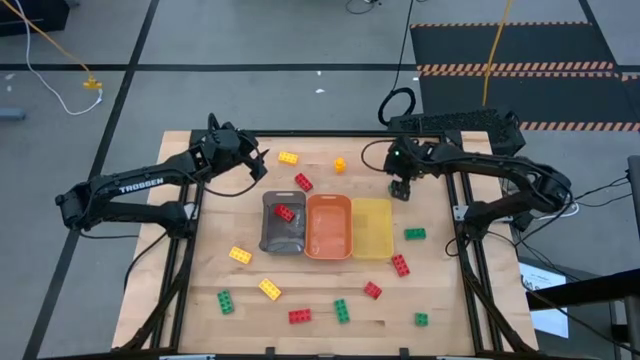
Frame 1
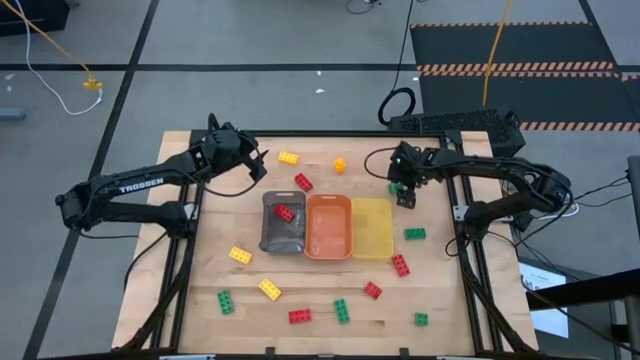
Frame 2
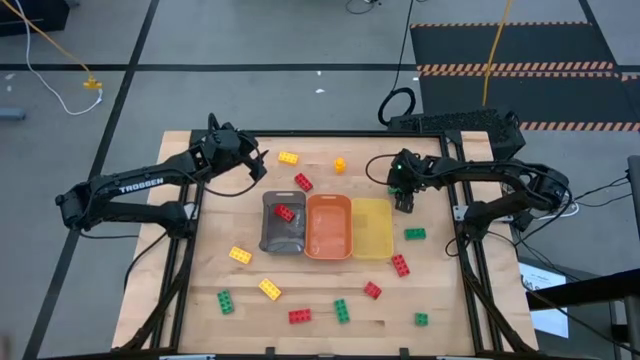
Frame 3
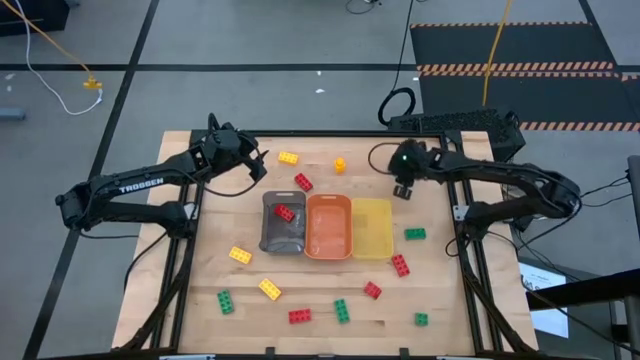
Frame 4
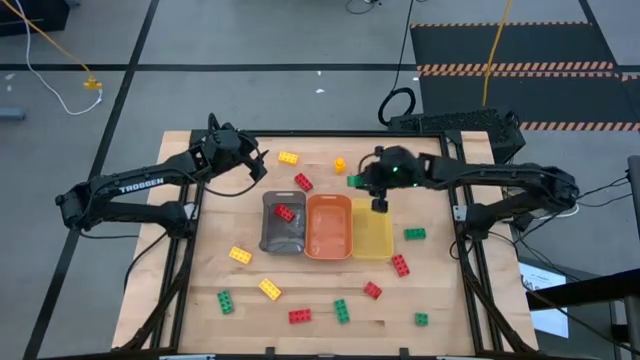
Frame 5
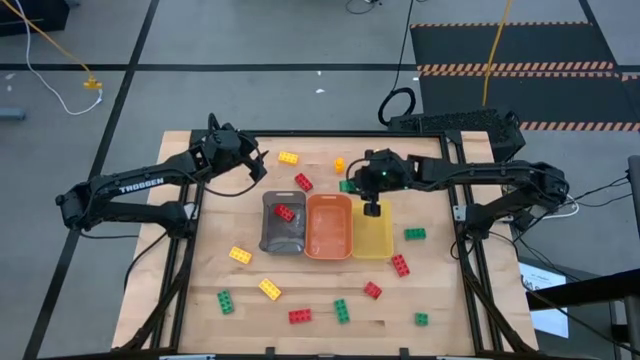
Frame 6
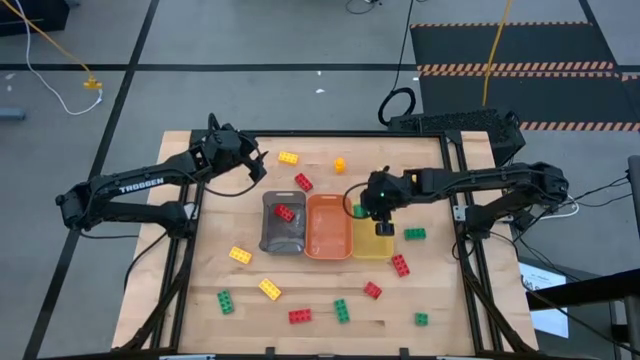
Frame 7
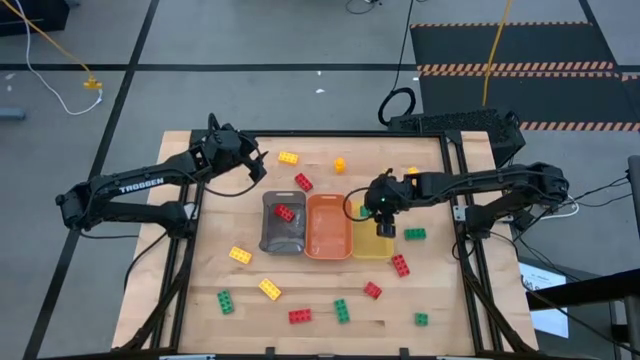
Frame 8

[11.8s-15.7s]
Task: Sort & place blocks by color
Put the green game piece into the yellow bin

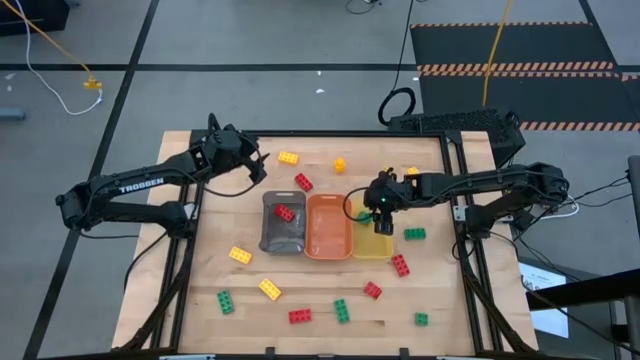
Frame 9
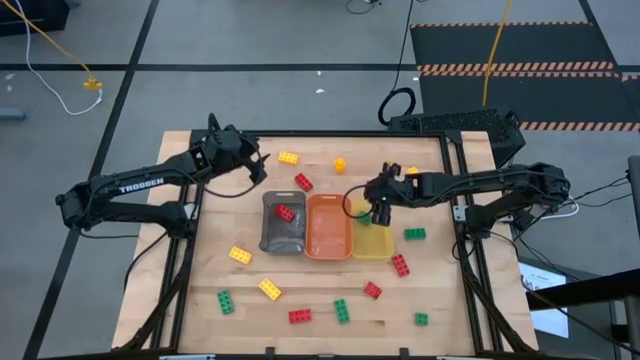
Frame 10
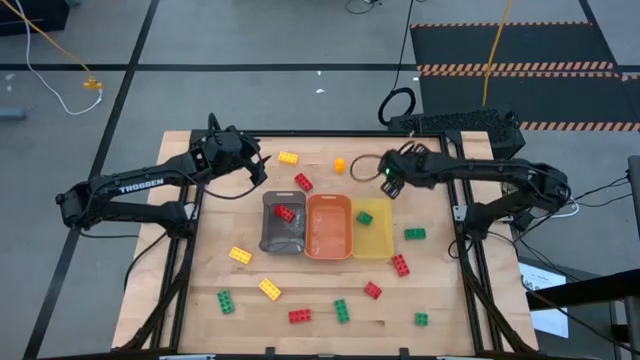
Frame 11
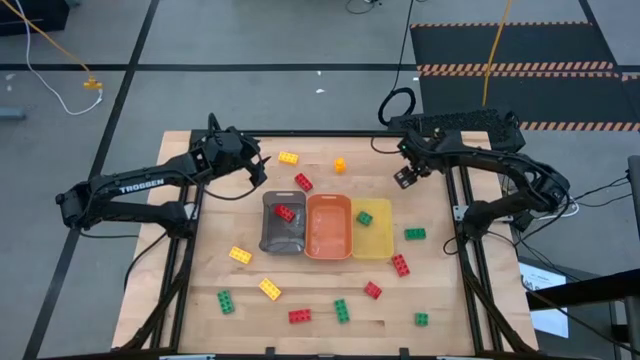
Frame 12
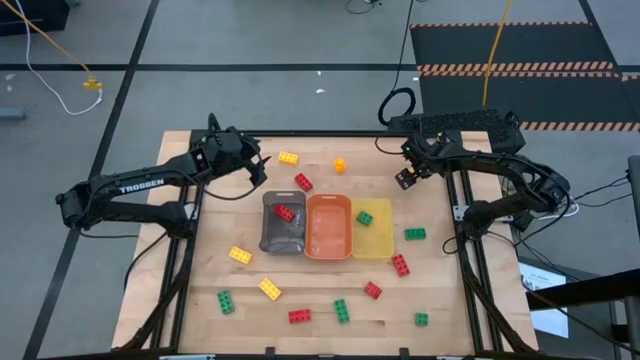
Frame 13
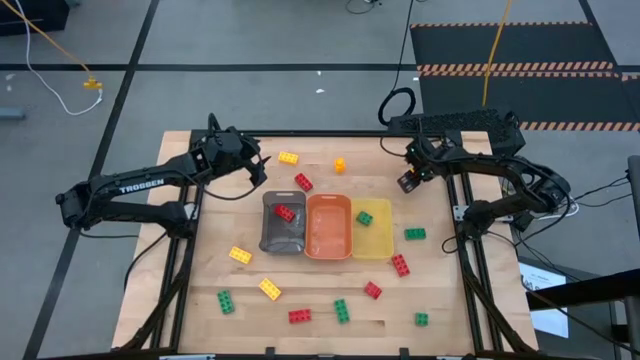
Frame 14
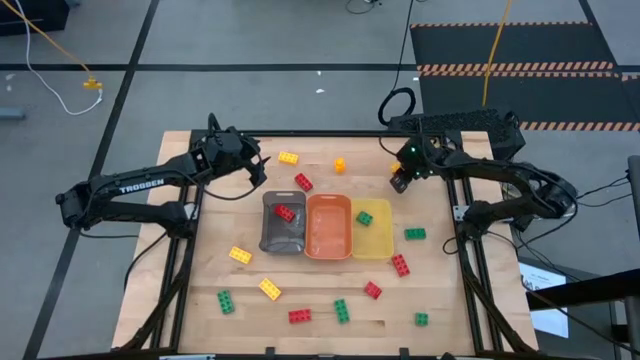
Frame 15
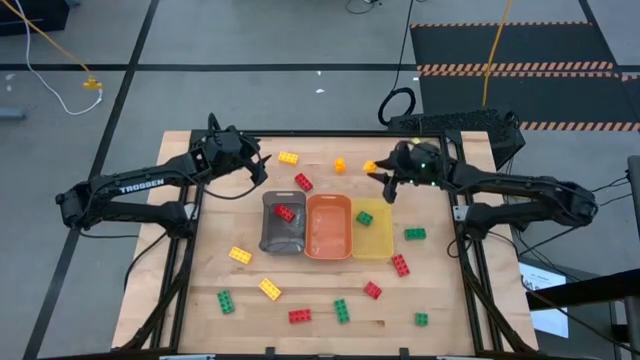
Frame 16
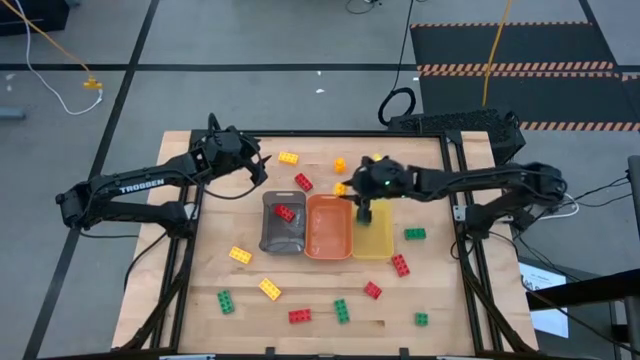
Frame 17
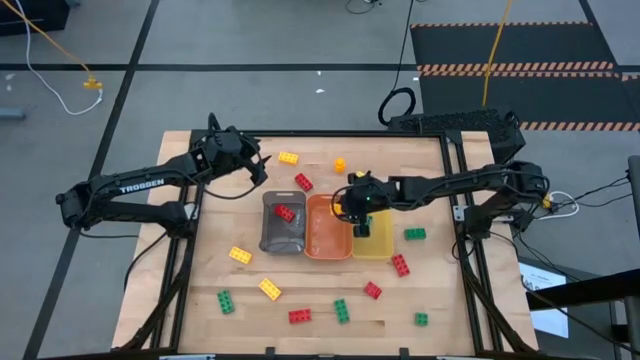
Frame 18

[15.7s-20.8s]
Put the yellow game piece into the orange bin

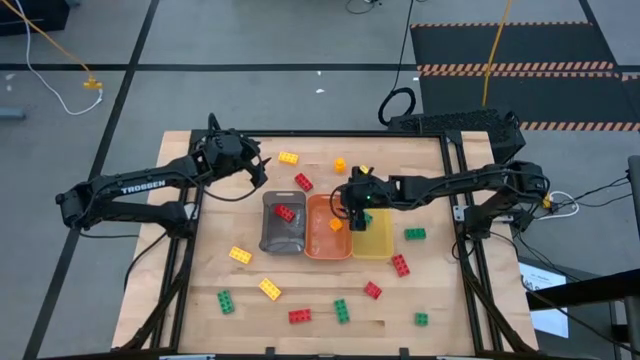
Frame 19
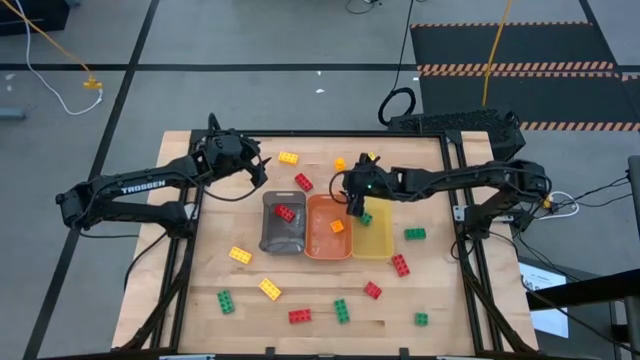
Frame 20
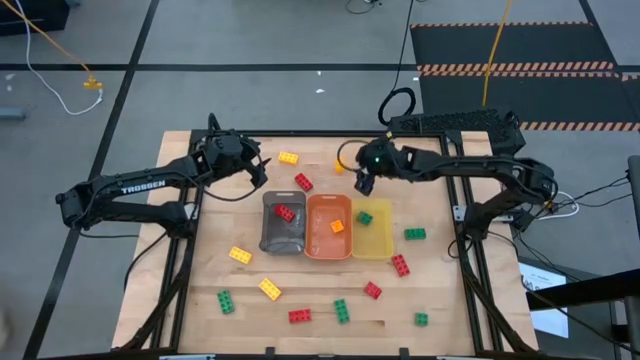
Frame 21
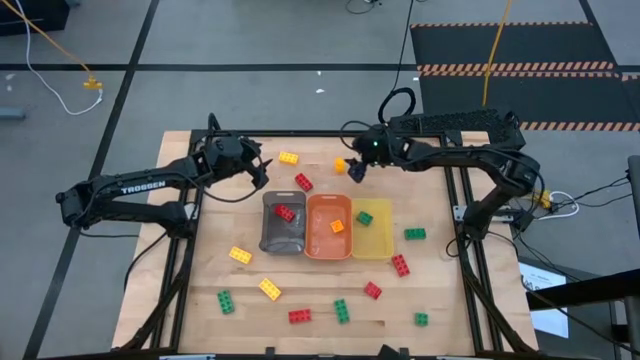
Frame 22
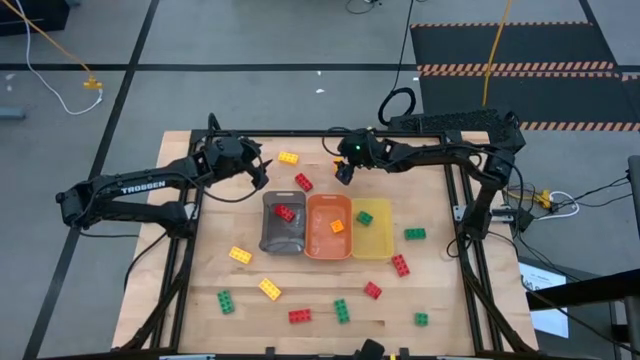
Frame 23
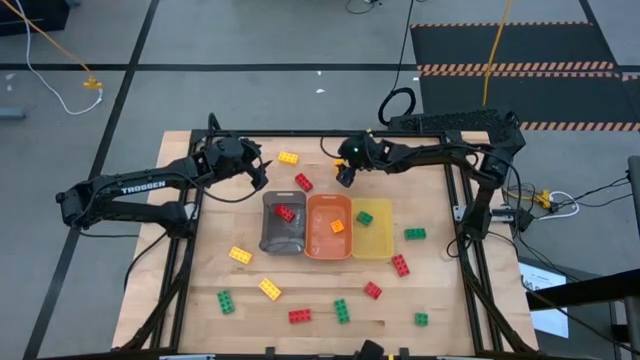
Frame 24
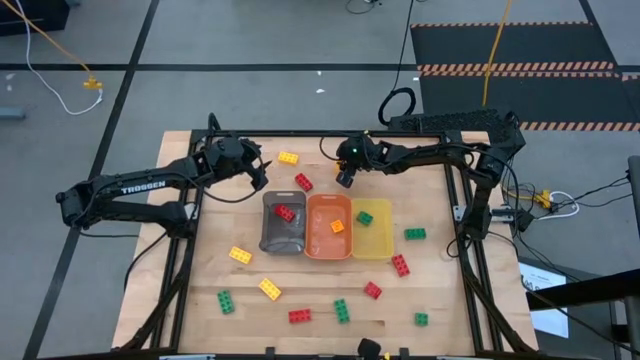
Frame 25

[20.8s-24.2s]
Put the yellow game piece into the yellow bin

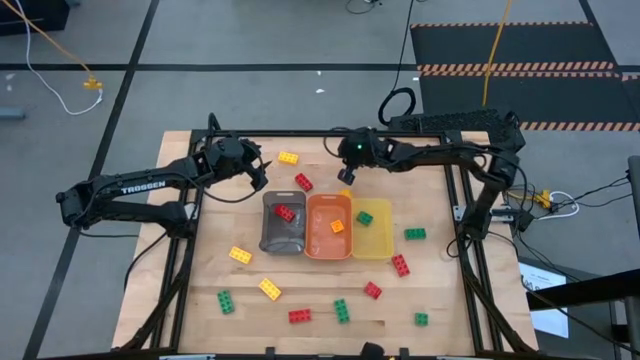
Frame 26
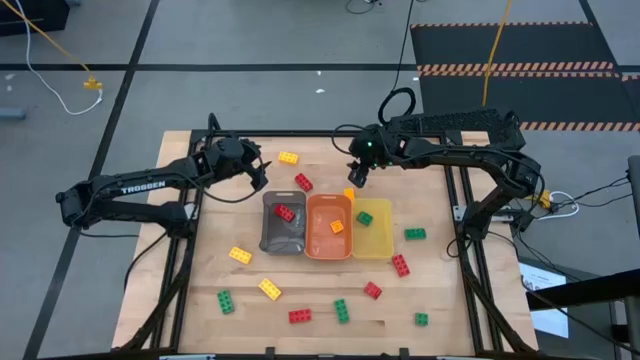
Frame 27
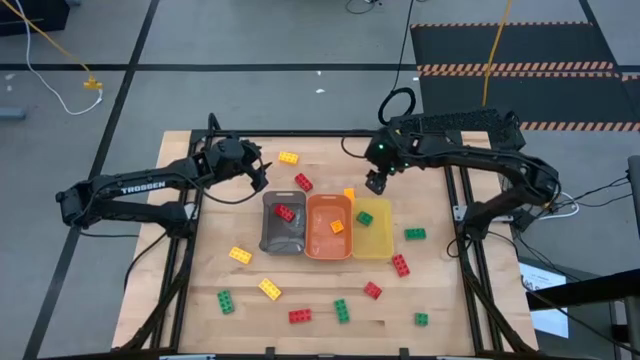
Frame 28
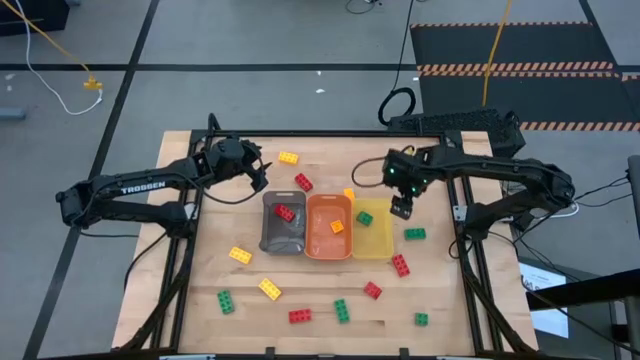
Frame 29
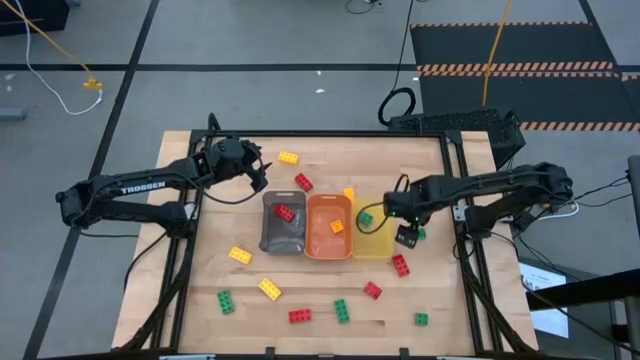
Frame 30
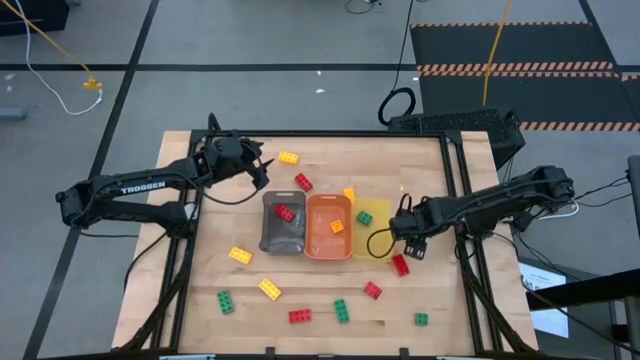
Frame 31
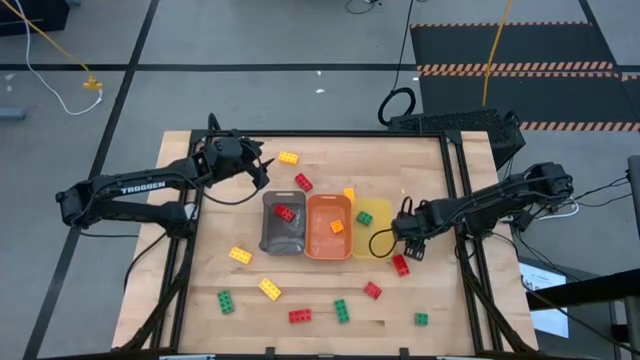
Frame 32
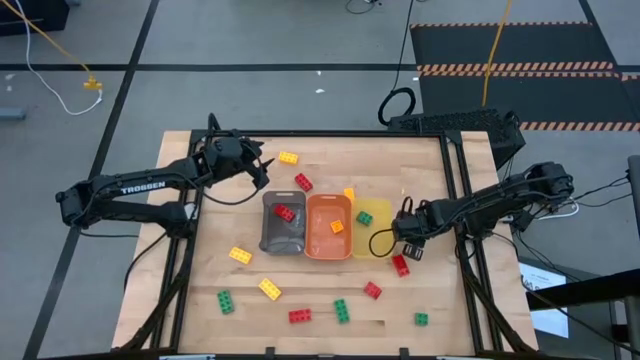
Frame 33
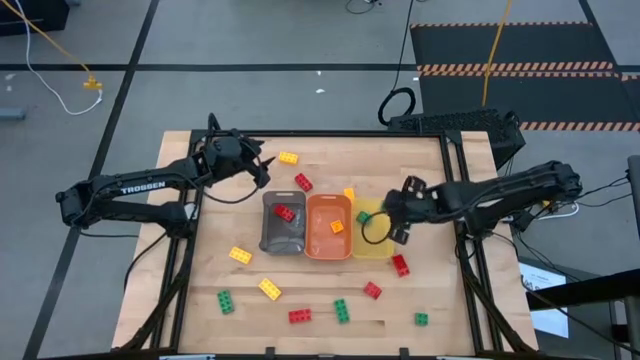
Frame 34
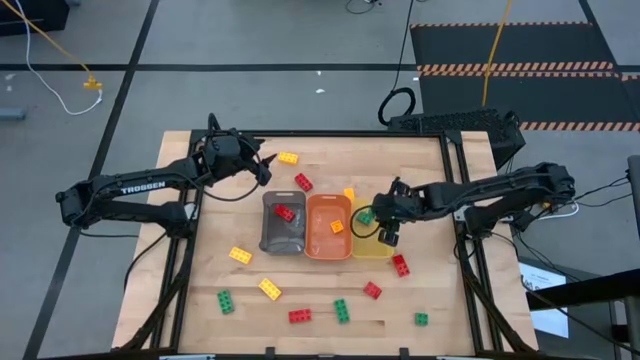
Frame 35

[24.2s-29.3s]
Put the green game piece into the yellow bin

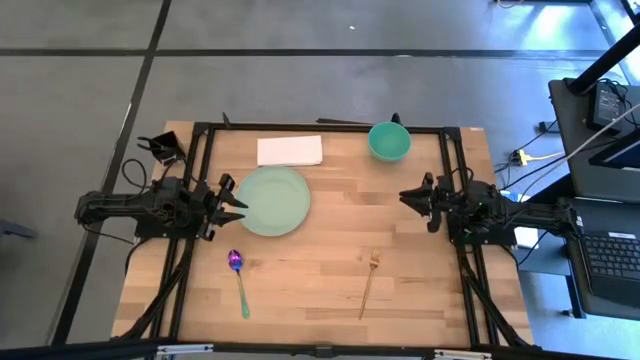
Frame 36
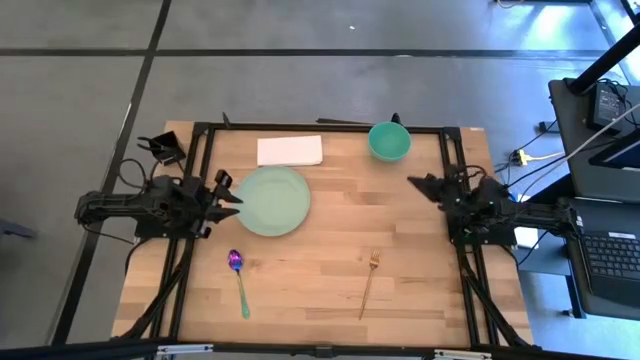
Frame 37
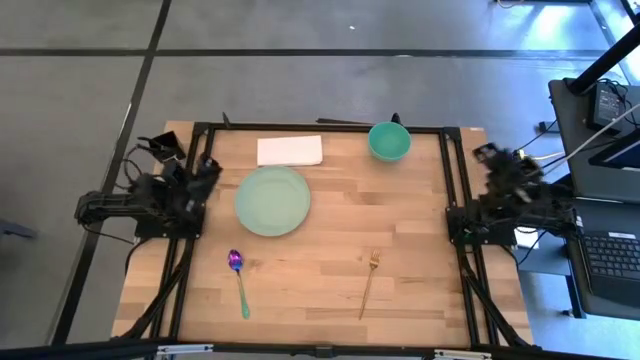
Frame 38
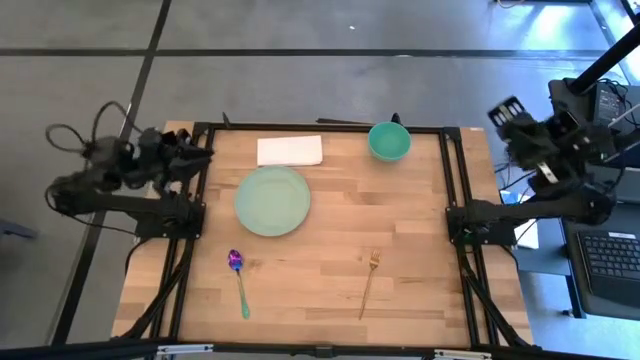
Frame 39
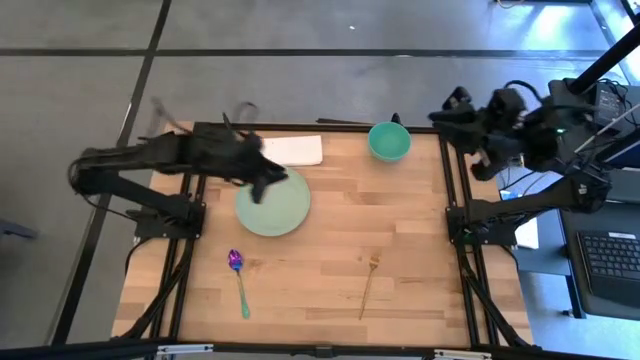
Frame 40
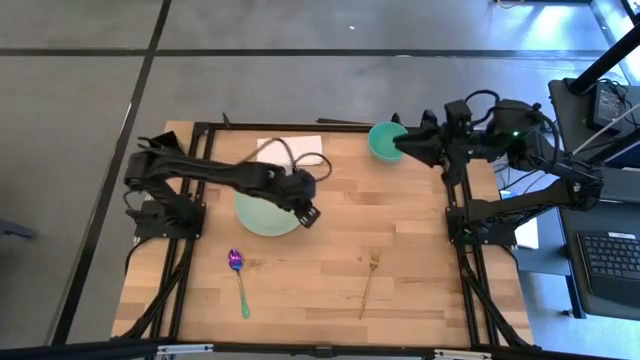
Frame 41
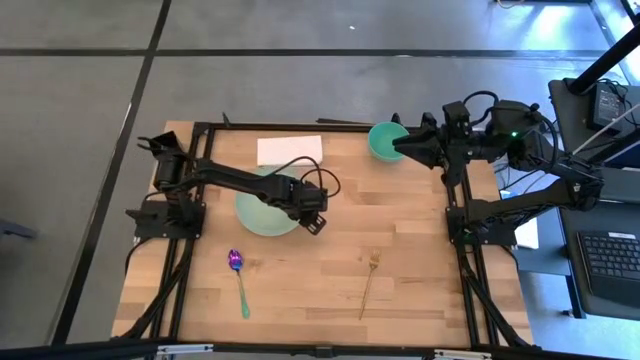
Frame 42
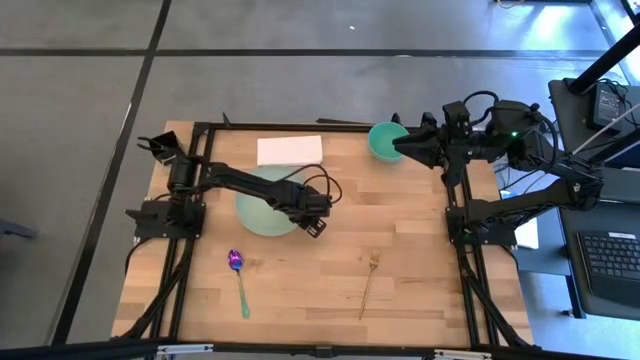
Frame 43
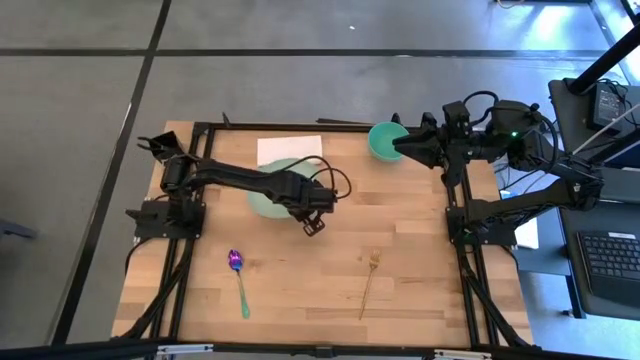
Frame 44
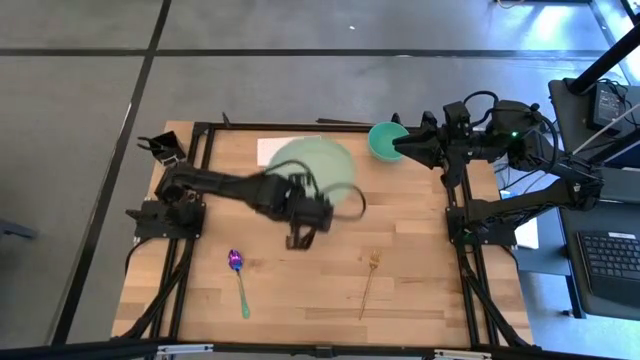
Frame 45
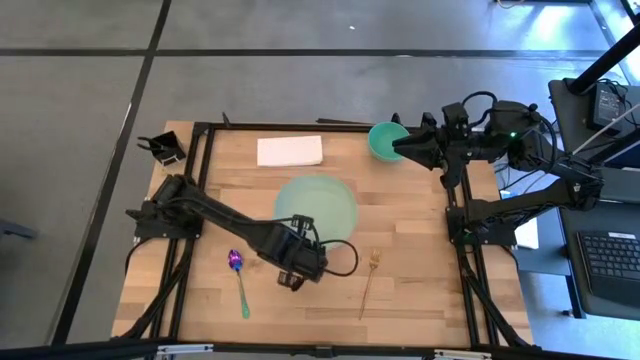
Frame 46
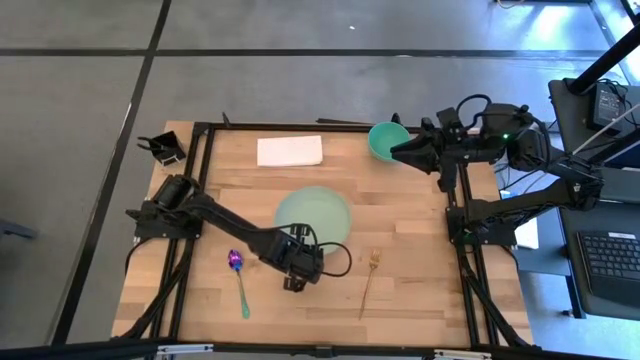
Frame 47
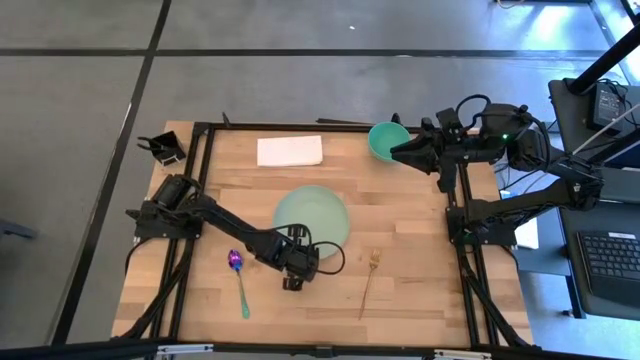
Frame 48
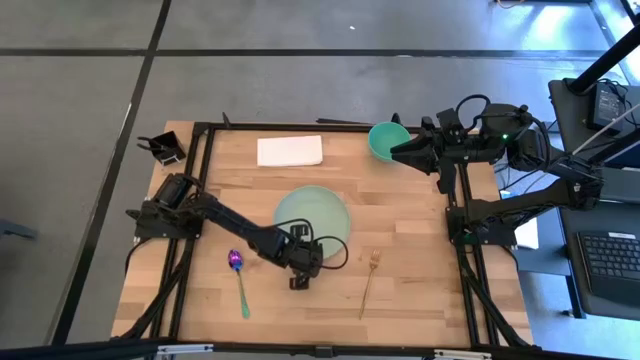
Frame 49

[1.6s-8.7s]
Task: Set table place
Move the green plate to the center of the table
